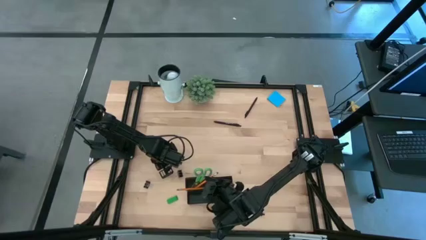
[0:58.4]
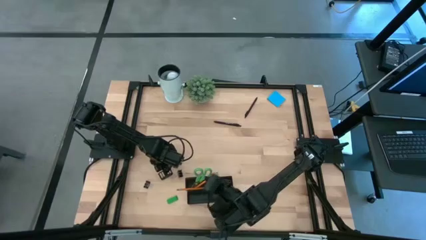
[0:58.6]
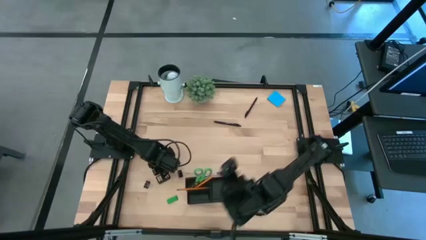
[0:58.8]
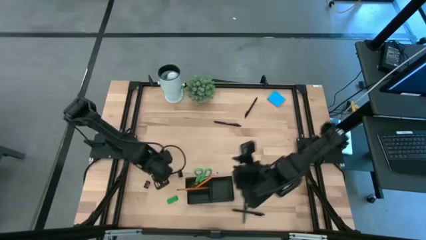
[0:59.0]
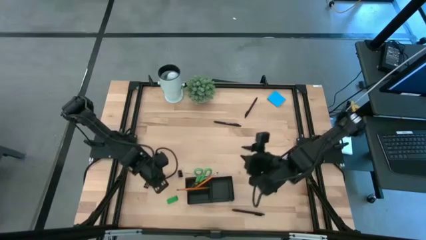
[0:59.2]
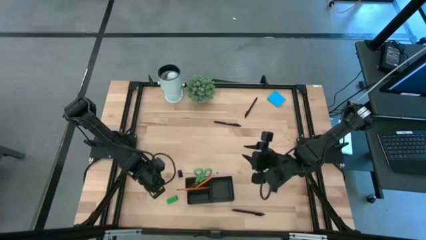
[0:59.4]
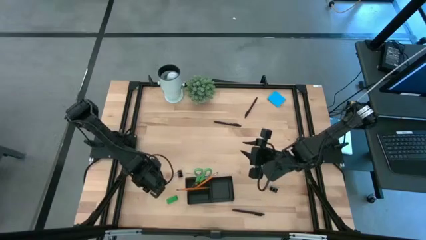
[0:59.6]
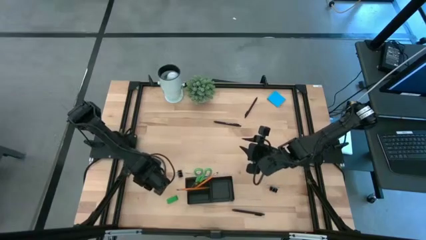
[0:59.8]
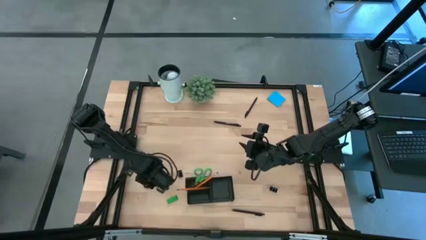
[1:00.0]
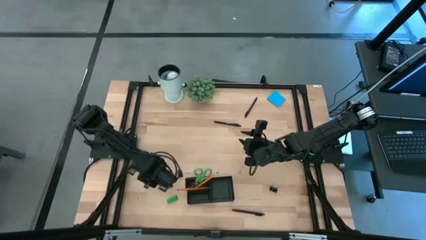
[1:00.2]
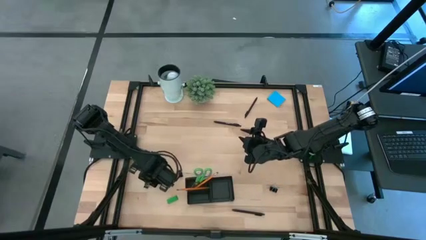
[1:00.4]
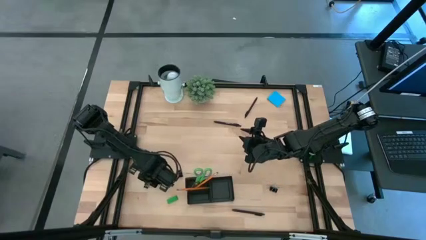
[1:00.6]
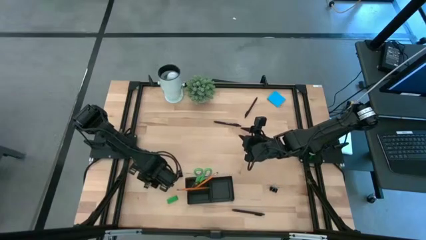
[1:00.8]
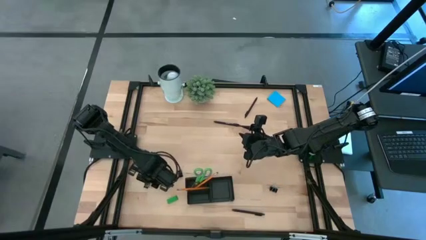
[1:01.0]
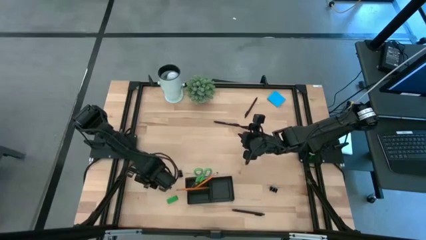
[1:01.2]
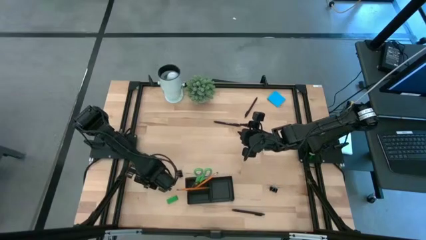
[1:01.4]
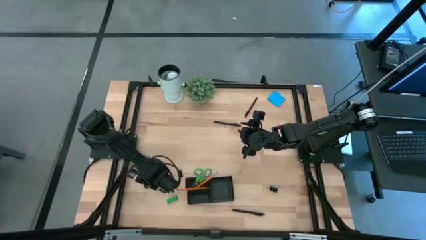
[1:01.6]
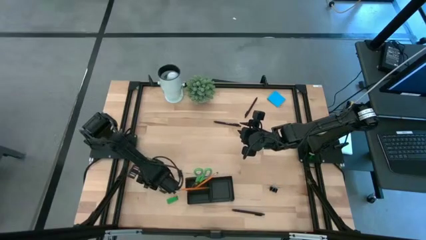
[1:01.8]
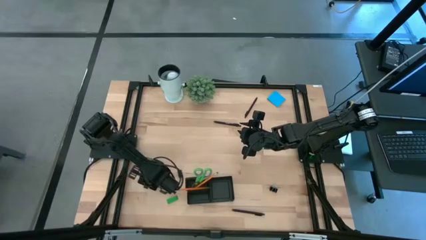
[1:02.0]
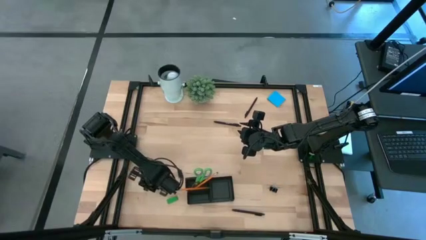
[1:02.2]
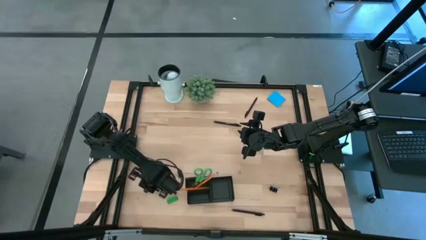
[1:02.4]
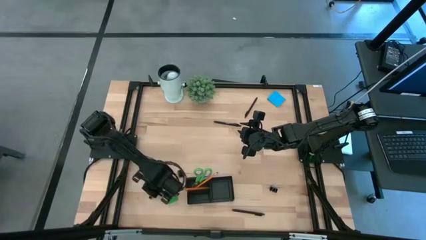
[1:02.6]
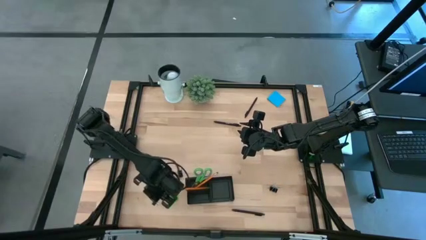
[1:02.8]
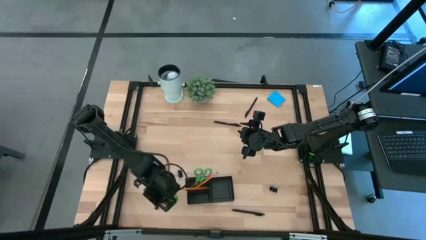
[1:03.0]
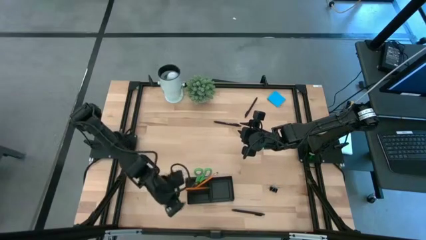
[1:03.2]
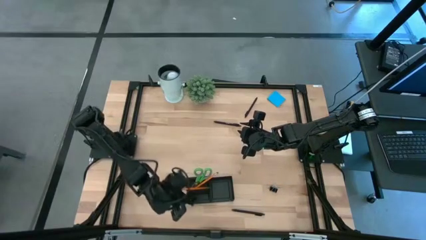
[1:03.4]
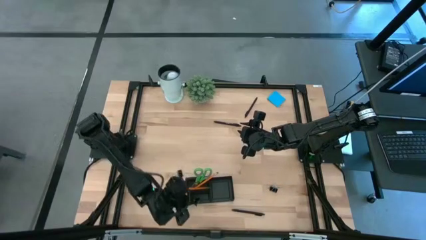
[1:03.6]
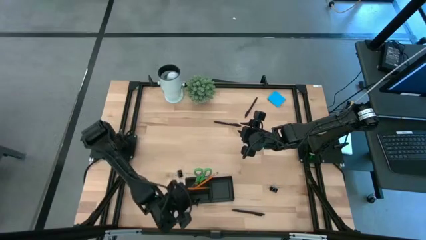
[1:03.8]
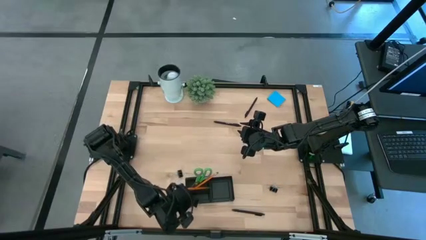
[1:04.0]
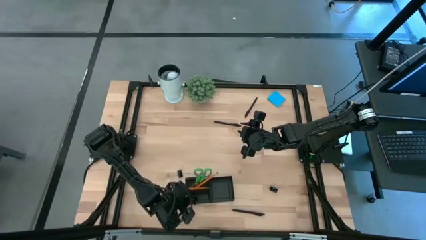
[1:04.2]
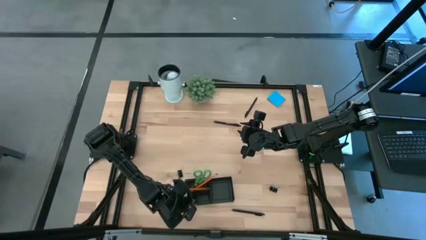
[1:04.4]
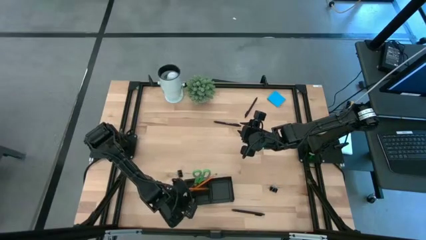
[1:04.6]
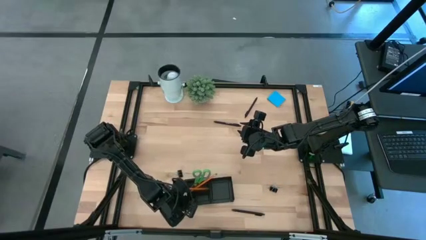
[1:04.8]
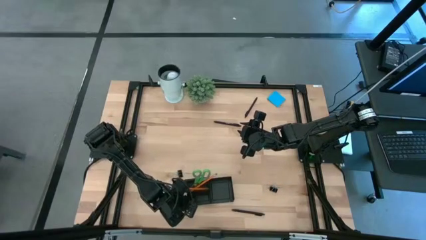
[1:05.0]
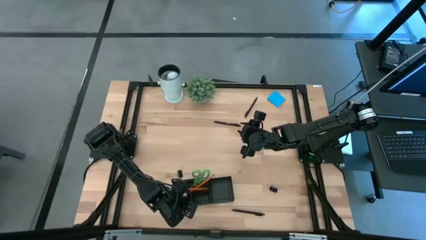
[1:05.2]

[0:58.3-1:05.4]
Task: Pick and place office supplies into organizer
Put the left black binder clip into the black desk organizer

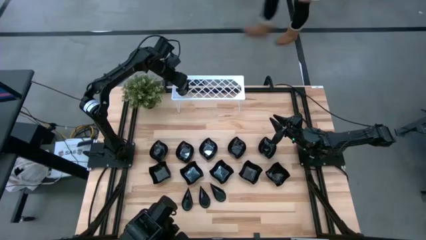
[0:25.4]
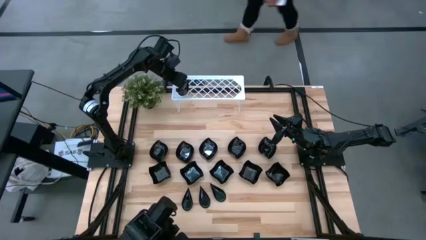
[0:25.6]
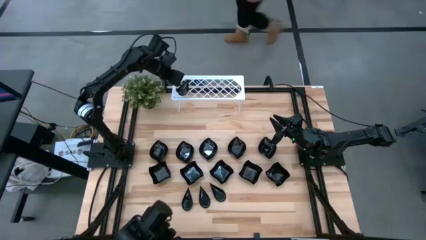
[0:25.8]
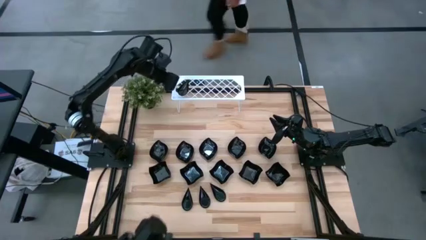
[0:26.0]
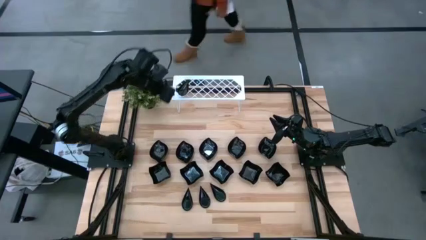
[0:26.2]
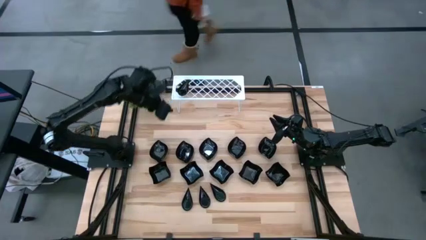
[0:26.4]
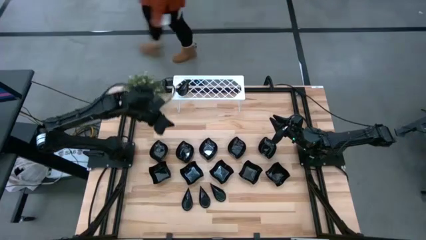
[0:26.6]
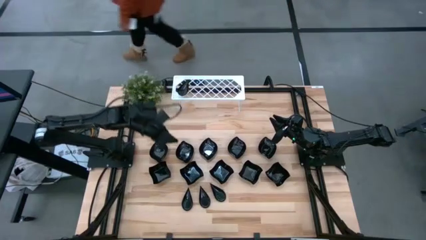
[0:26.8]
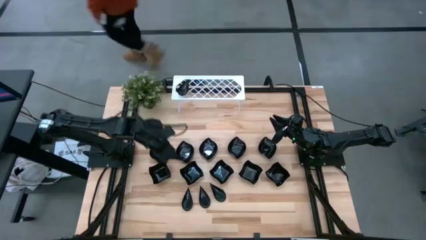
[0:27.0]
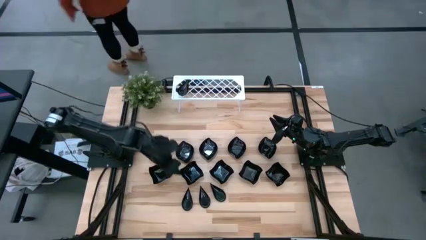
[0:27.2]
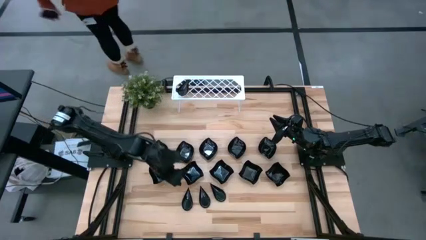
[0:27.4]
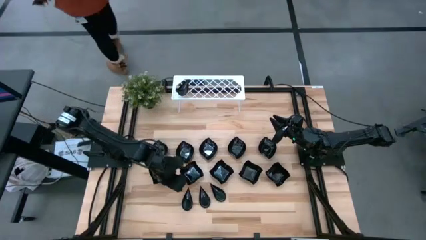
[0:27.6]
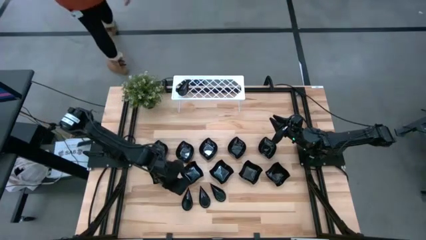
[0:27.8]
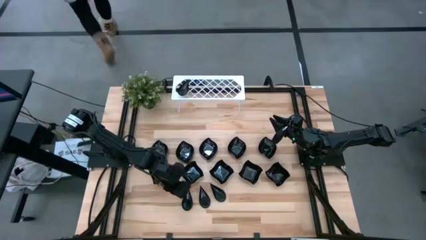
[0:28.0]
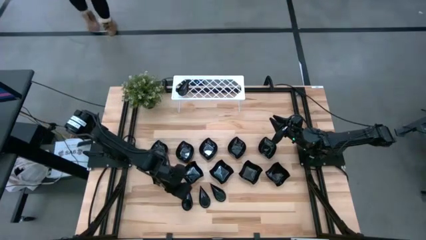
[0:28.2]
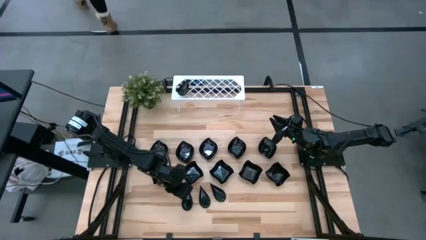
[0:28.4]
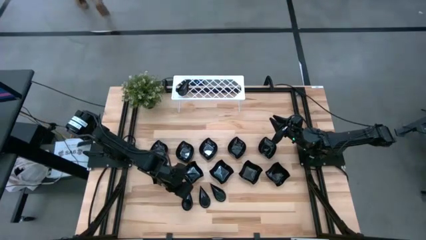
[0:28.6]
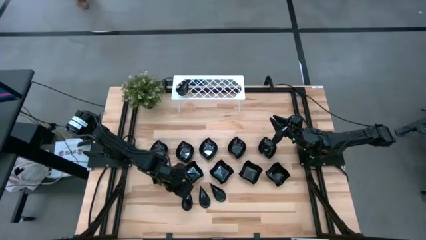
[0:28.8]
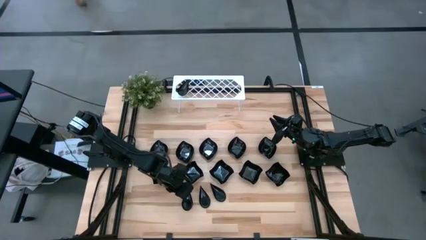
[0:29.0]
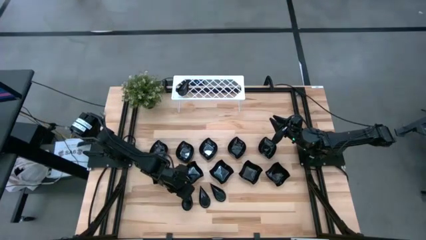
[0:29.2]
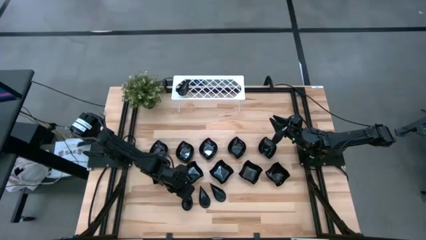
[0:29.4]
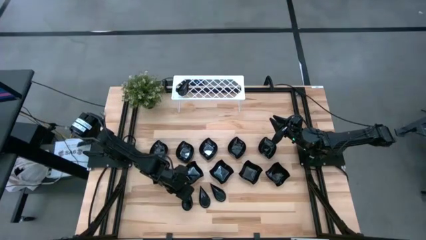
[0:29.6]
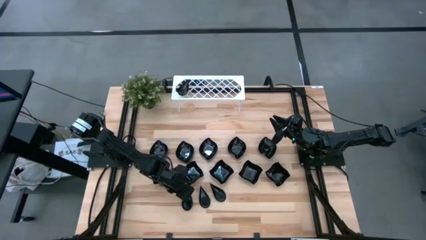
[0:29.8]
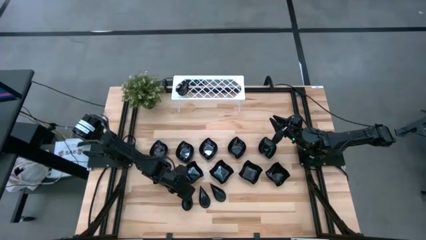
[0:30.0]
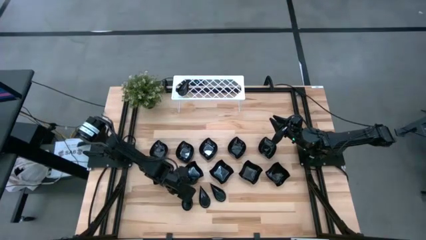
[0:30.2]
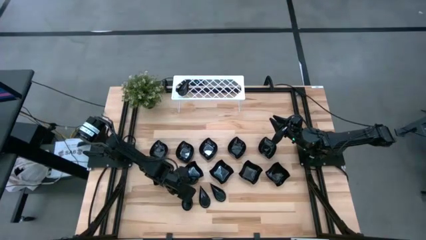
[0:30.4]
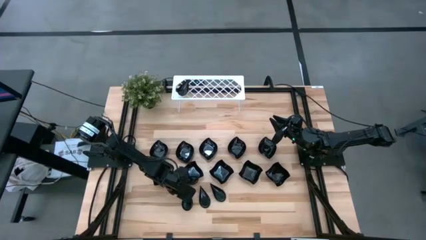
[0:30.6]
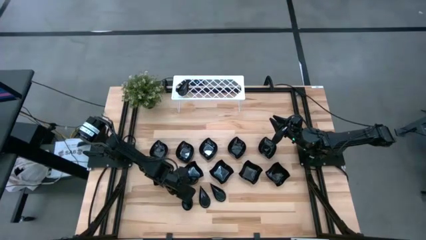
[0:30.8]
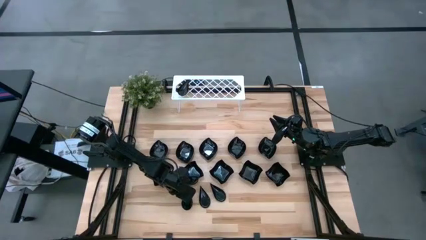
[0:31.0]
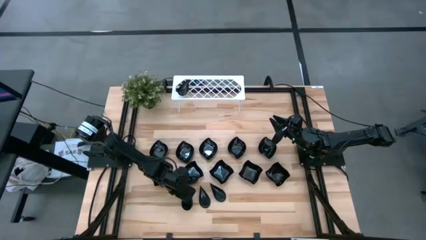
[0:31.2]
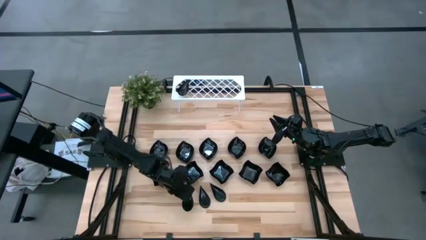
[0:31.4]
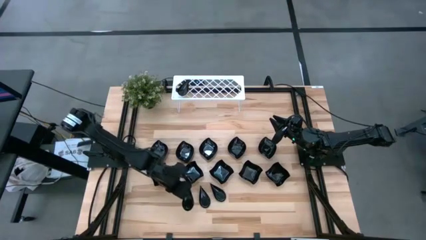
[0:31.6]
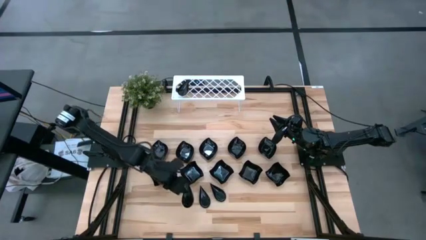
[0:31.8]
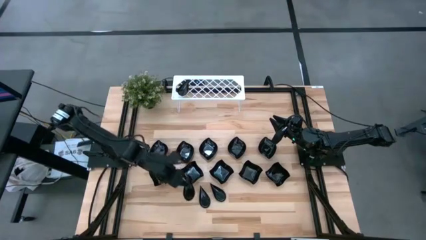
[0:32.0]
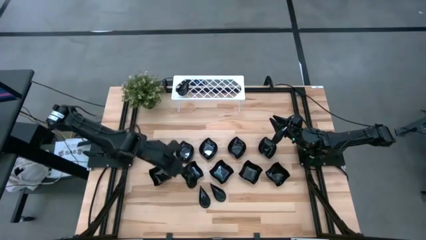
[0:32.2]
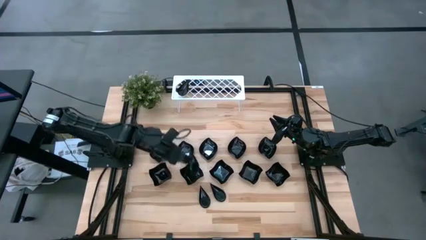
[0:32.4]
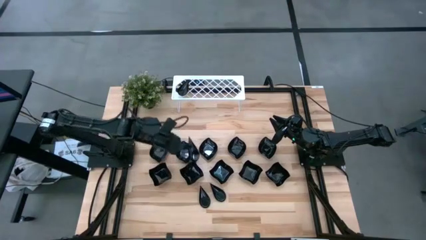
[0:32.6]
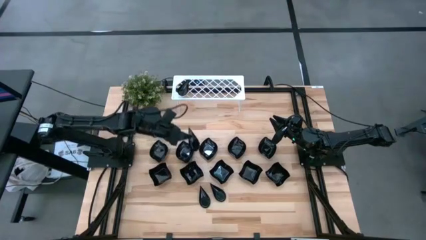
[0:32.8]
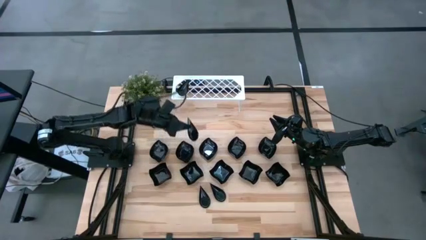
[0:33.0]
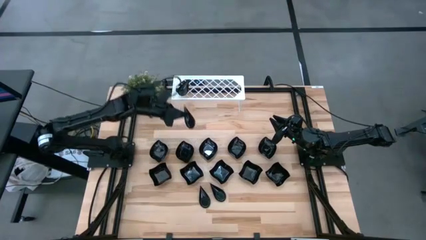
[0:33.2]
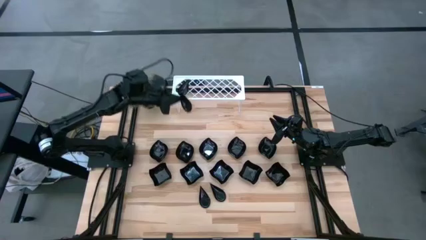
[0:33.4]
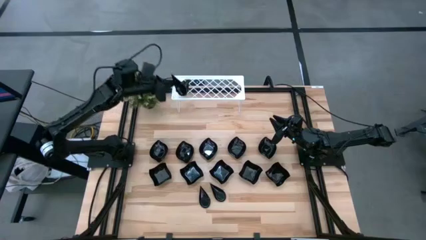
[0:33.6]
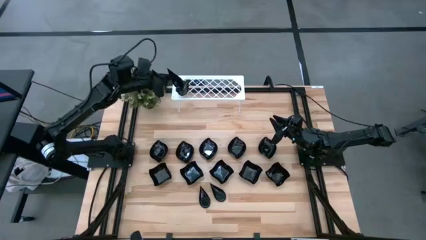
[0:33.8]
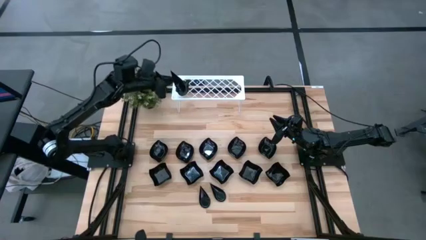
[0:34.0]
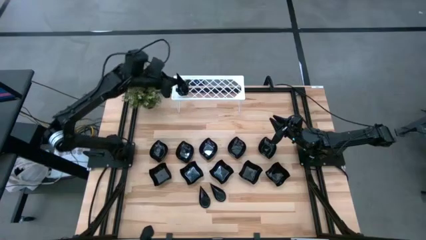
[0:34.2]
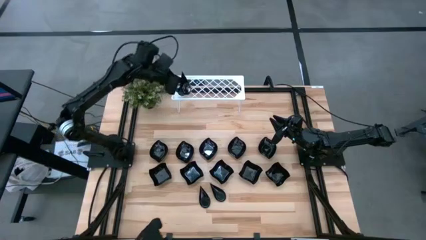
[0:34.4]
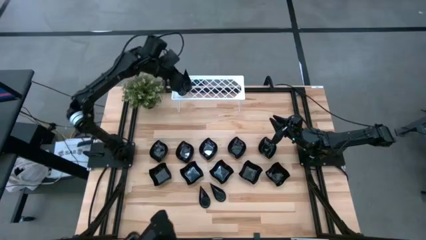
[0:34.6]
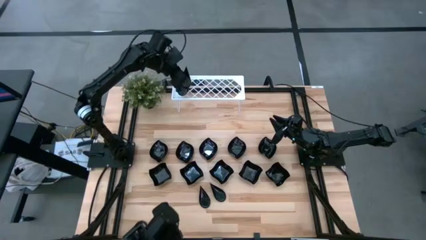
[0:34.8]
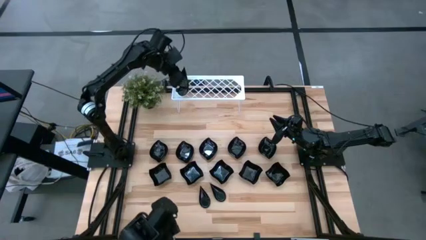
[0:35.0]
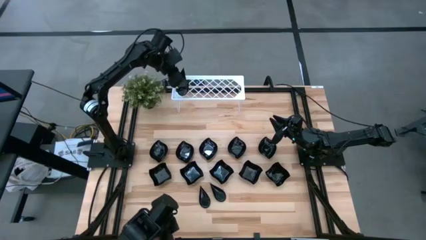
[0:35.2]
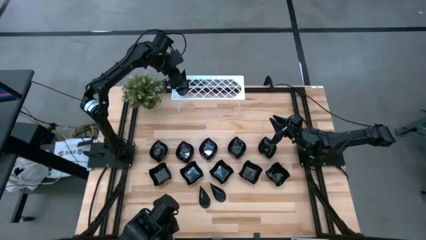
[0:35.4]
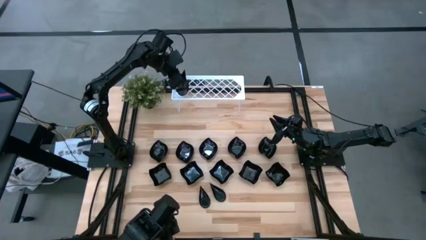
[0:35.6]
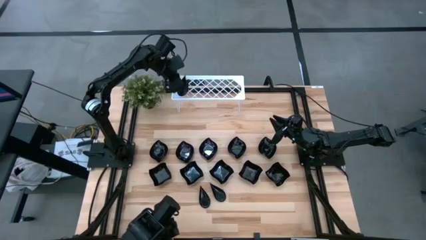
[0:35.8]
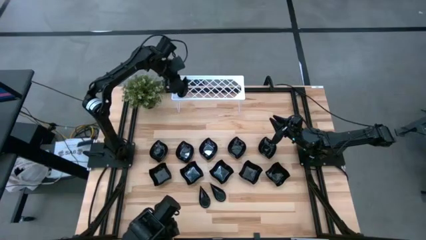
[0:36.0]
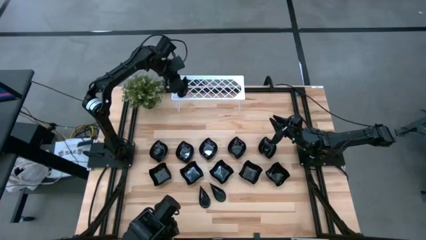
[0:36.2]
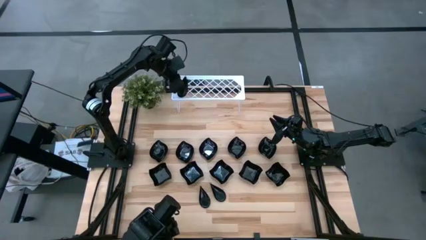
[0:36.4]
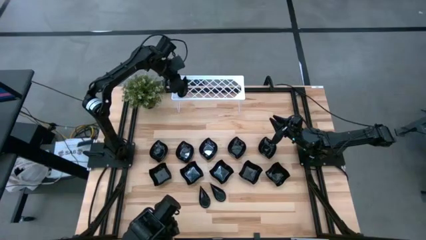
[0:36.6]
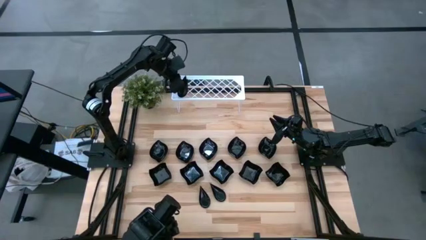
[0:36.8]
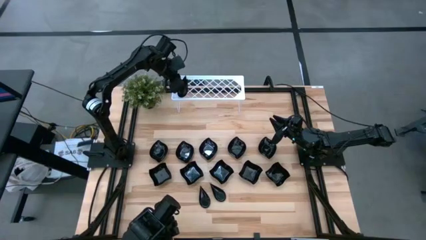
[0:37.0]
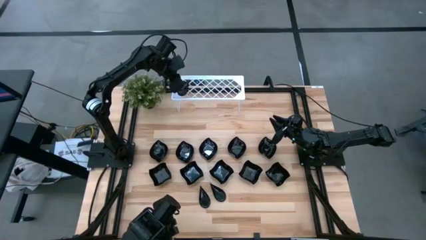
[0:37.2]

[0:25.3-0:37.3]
Task: Pick & Place Mini shaped plates
Stack the black drop shaped plate on top of the black drop shaped plate on the shelf
